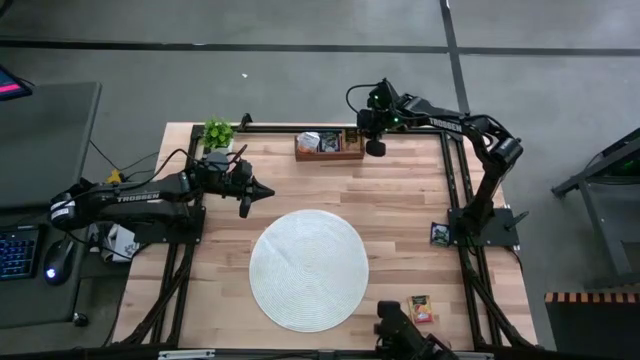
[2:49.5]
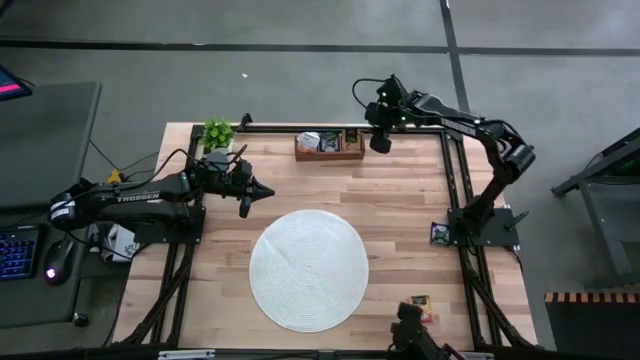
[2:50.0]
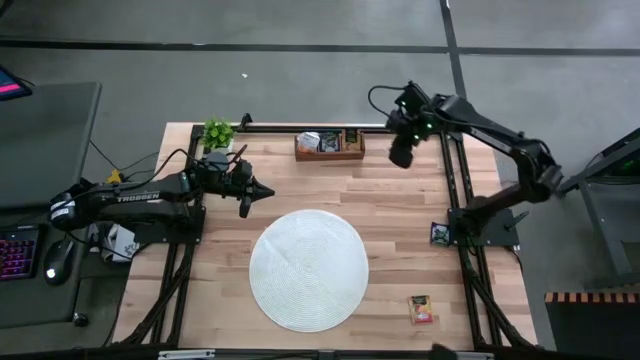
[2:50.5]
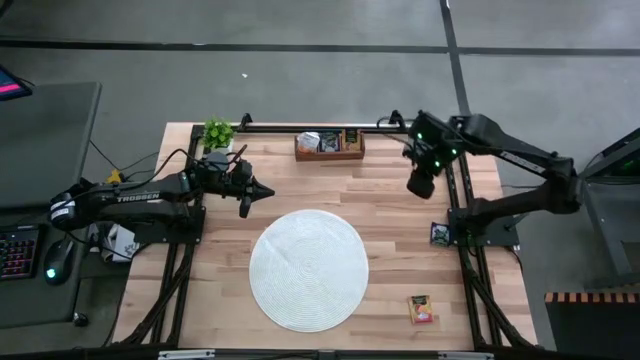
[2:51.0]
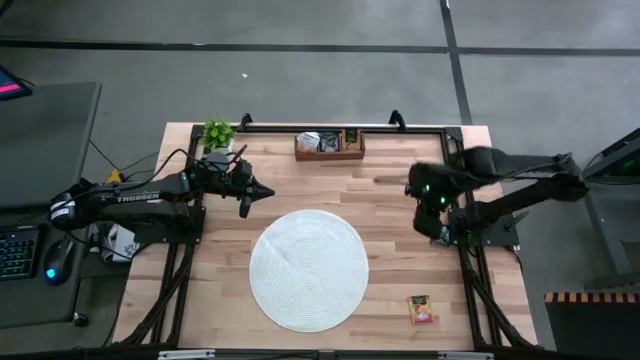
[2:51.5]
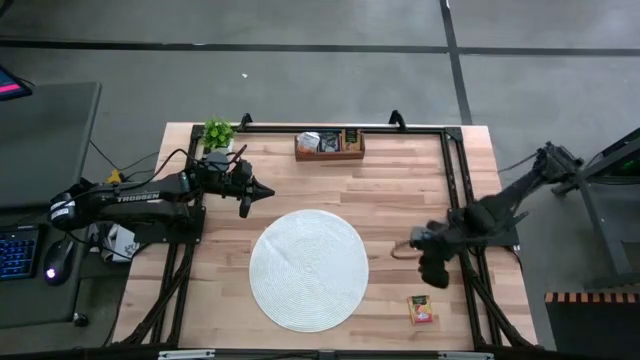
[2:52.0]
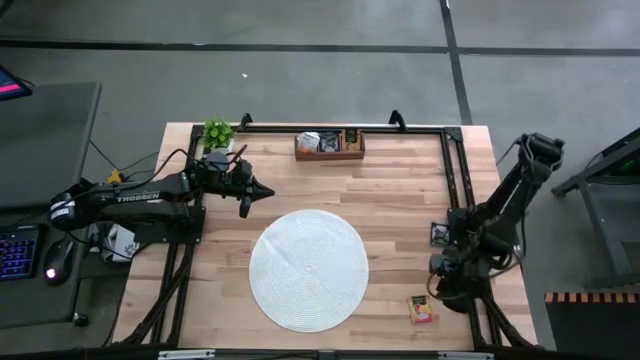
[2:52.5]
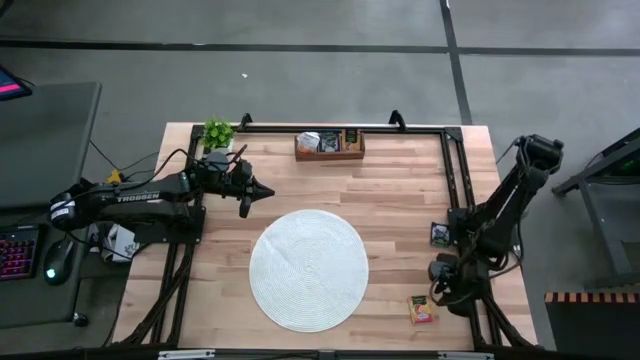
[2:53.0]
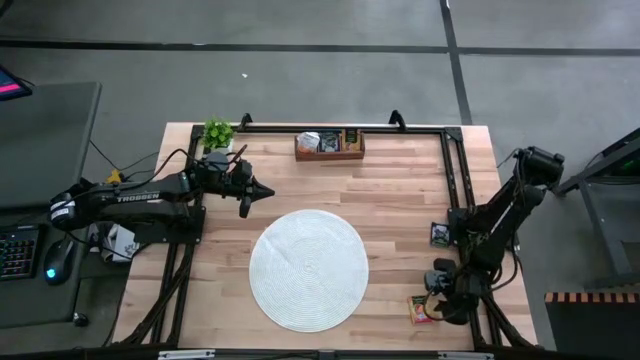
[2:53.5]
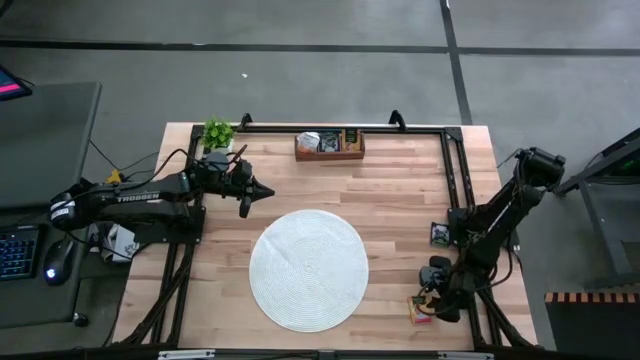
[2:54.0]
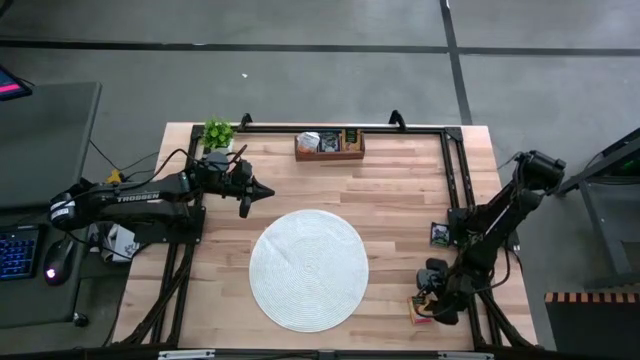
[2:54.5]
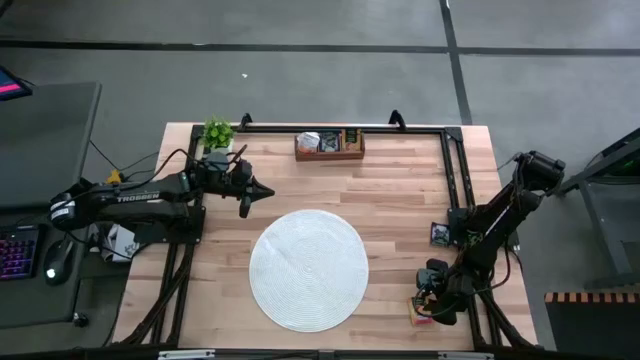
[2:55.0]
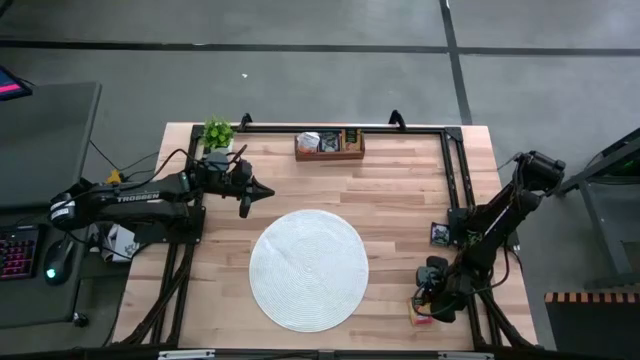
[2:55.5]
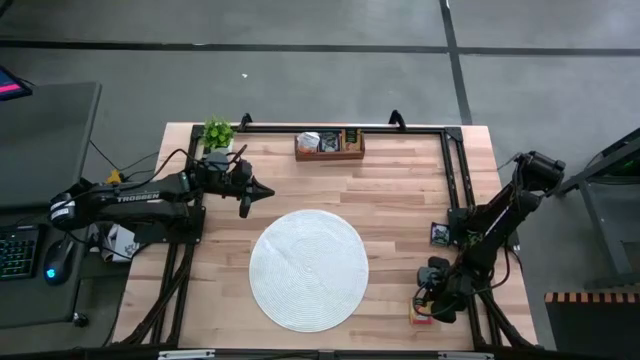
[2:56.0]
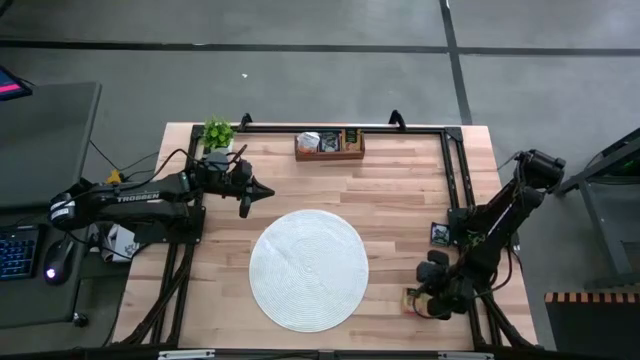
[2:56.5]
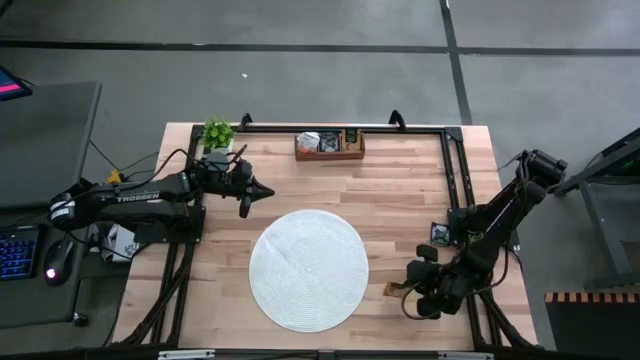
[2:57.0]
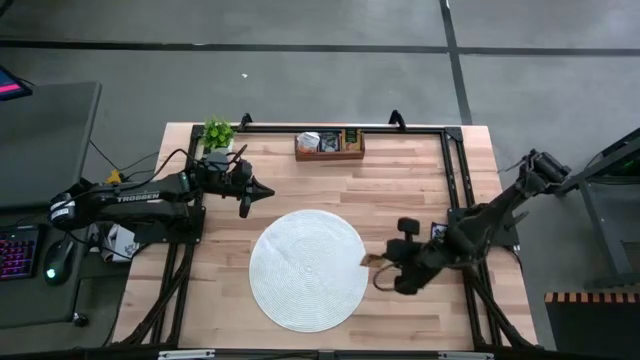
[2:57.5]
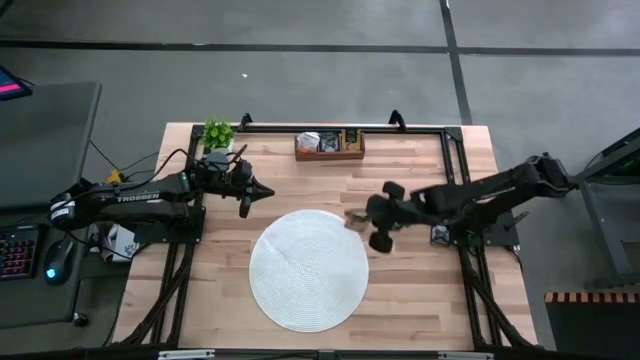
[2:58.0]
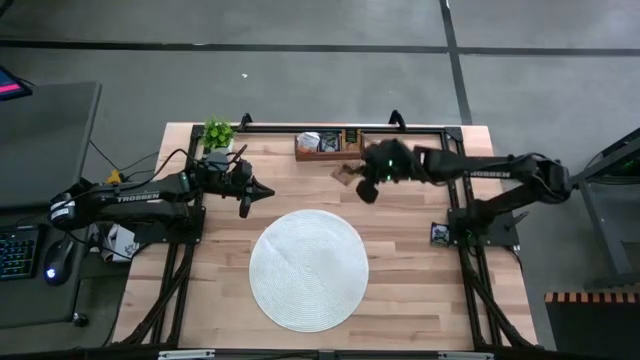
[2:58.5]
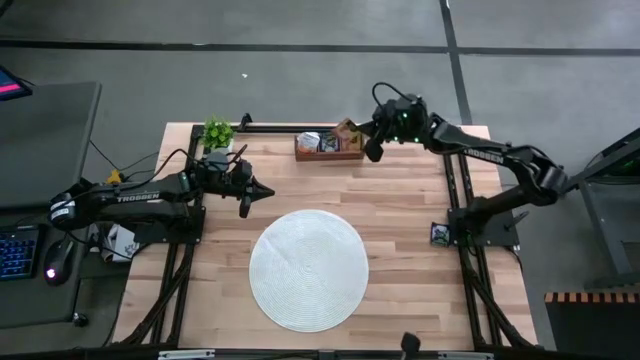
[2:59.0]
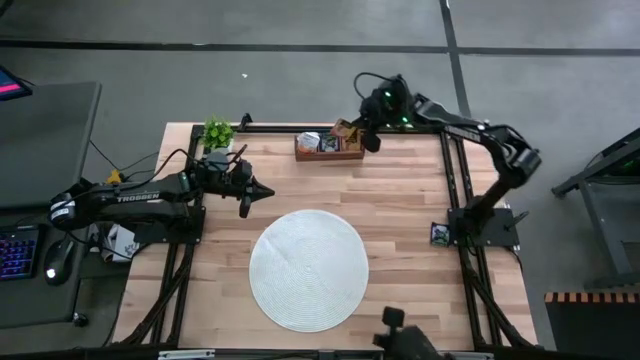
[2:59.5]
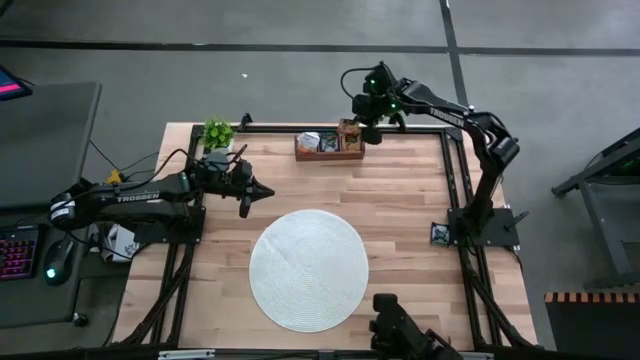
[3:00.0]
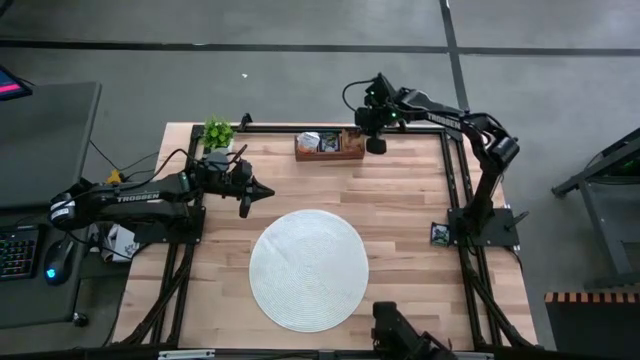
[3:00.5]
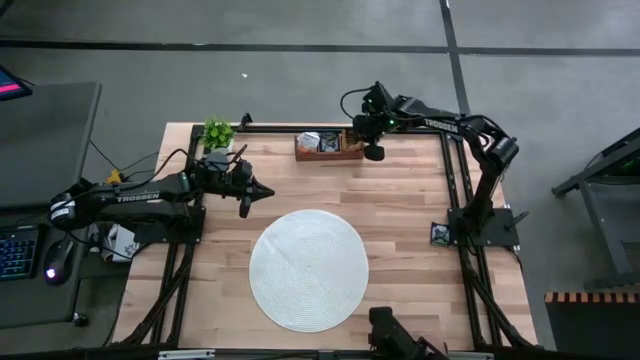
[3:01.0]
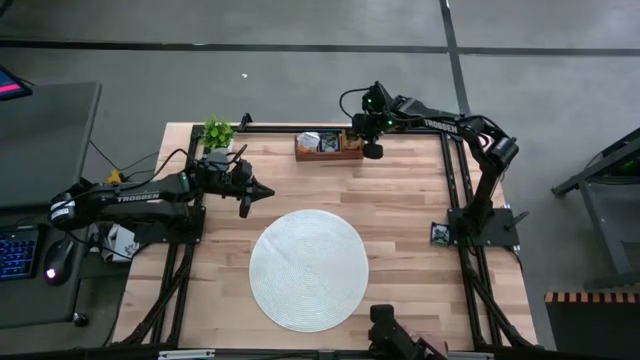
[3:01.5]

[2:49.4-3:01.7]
Task: Pick & Place Tea
Put the yellow tea bag into the right section of the wooden organizer

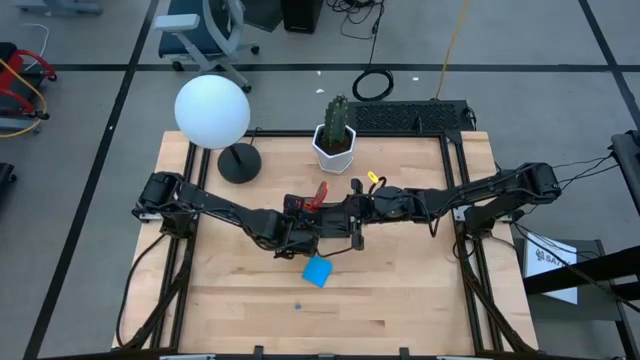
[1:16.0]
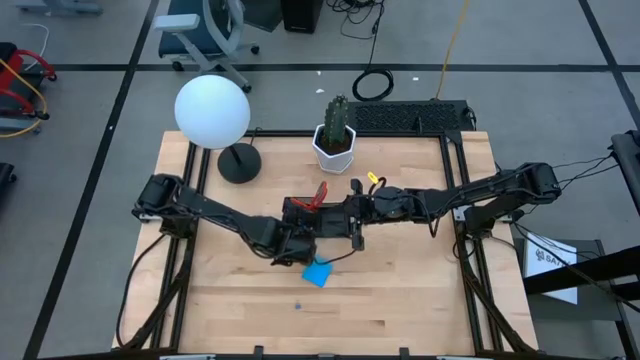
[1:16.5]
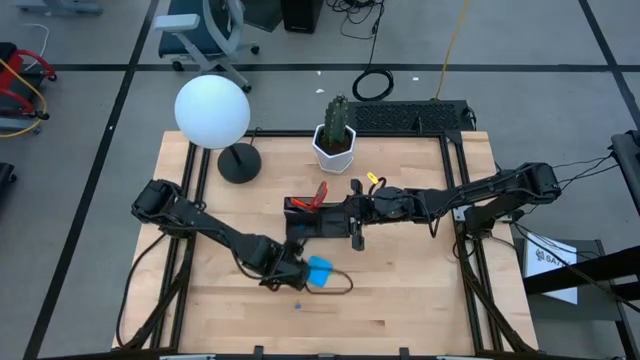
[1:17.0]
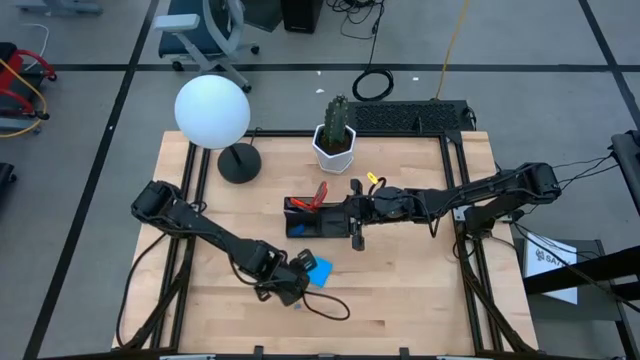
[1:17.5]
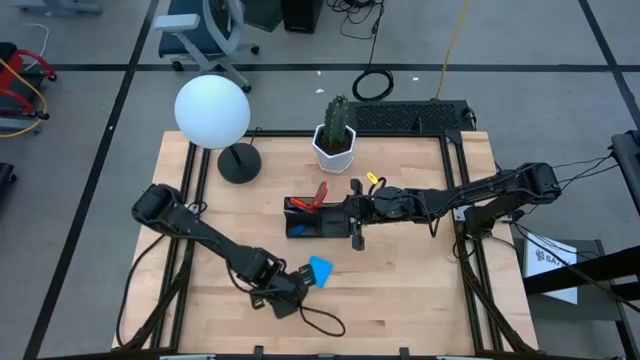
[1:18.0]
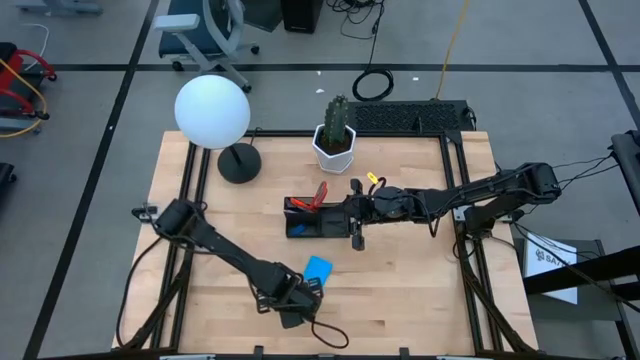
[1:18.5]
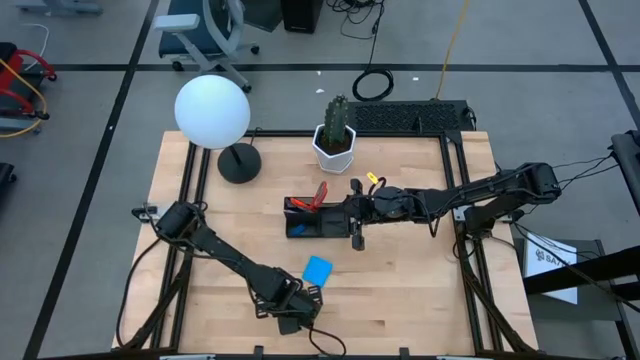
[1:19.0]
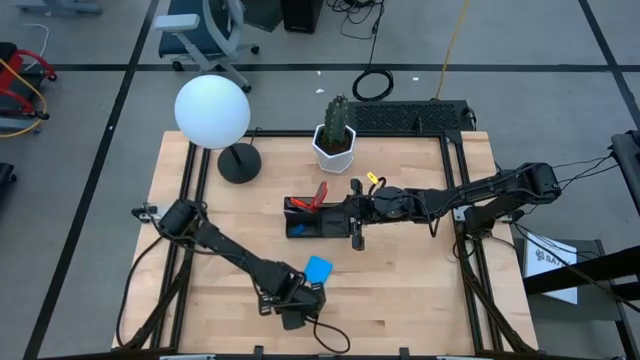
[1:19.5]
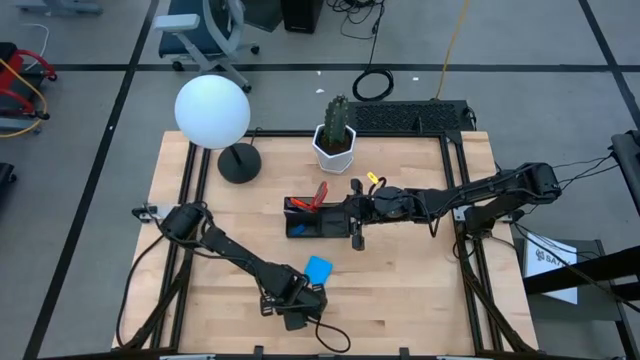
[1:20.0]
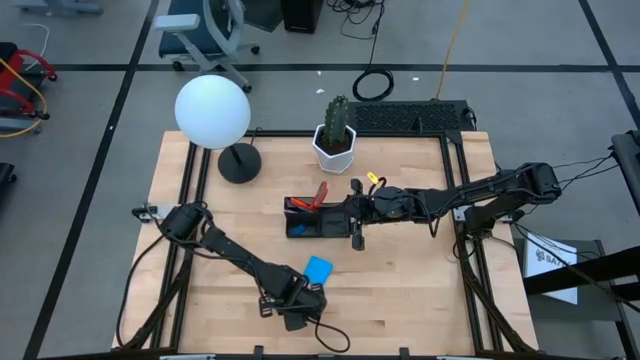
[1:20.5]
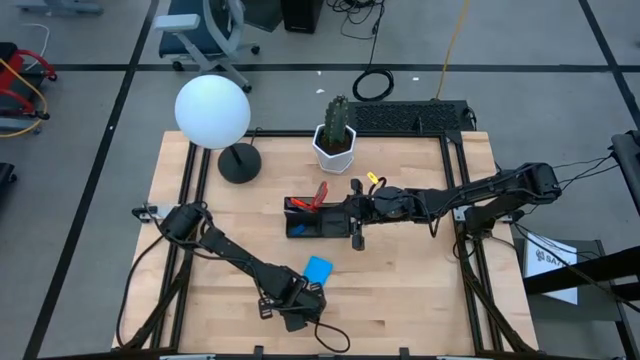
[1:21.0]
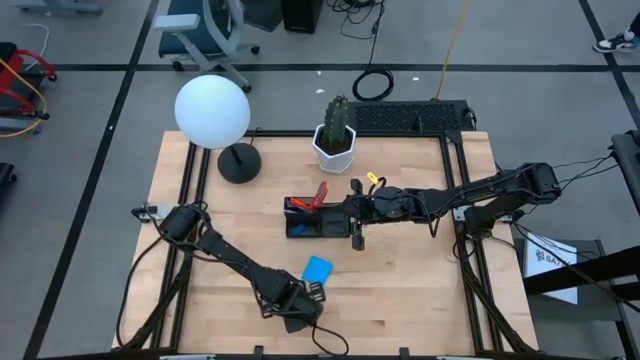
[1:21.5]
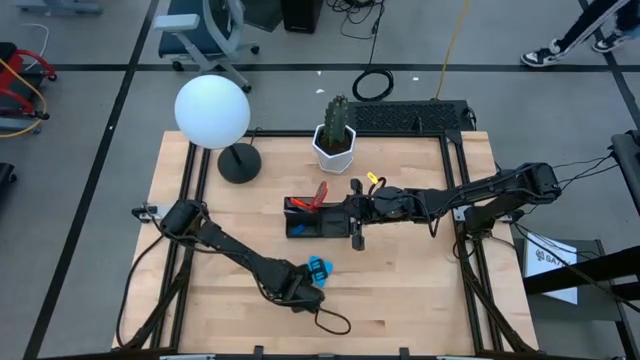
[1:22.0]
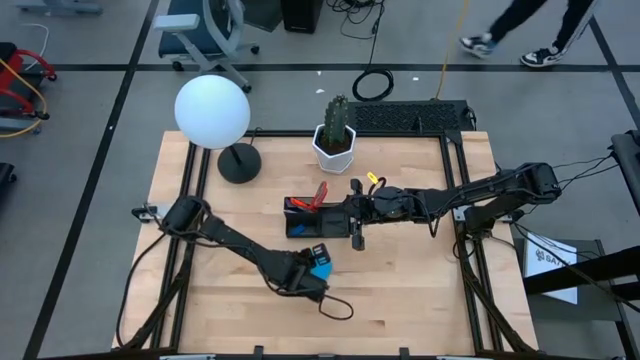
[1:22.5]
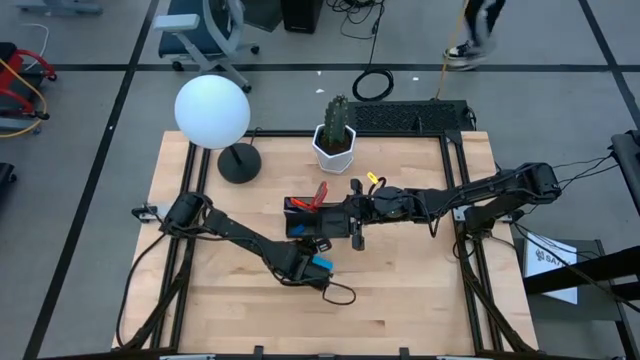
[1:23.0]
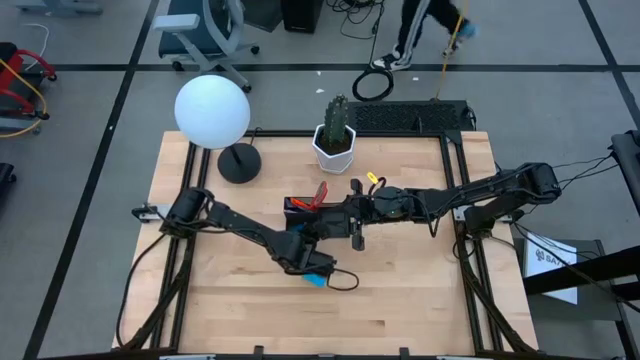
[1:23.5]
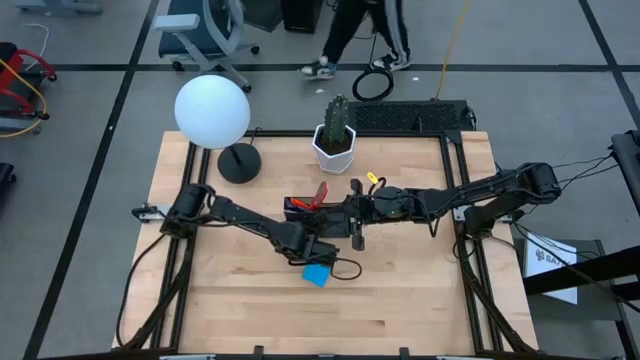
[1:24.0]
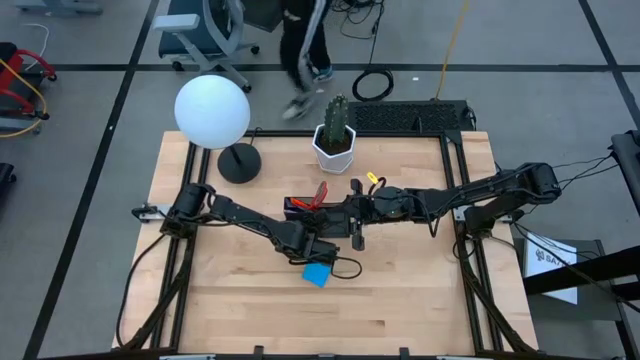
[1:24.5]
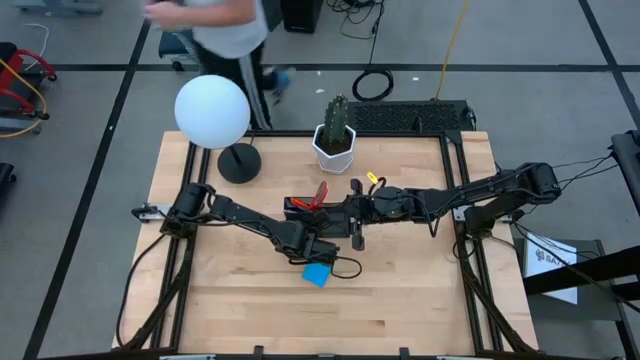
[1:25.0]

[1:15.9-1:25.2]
Task: Pick and place office supplies into organizer
Put the blue binder clip into the black desk organizer
